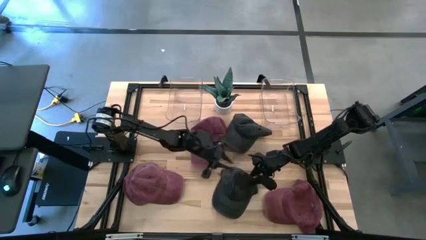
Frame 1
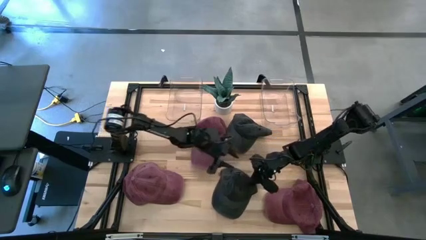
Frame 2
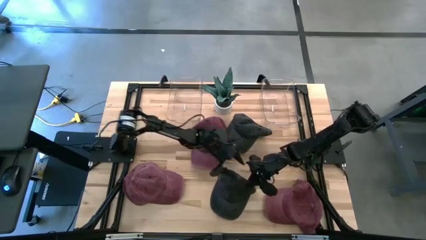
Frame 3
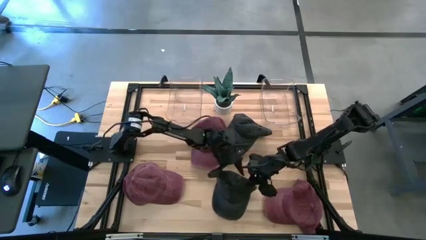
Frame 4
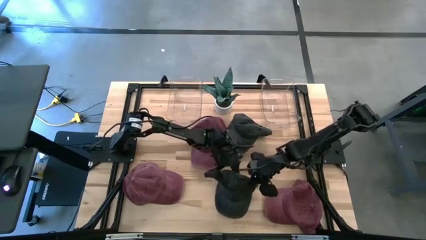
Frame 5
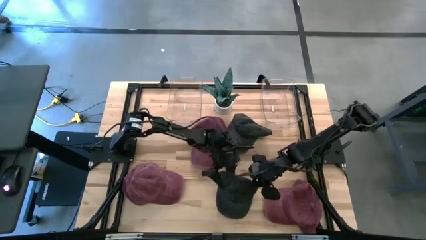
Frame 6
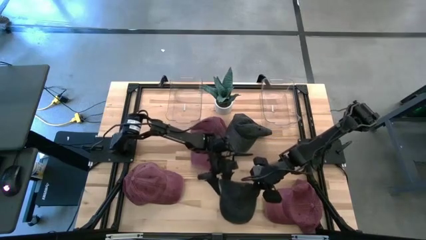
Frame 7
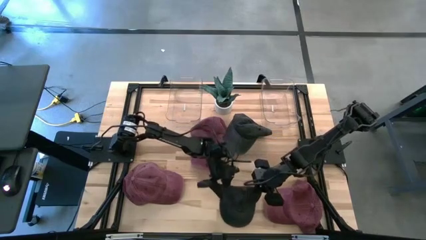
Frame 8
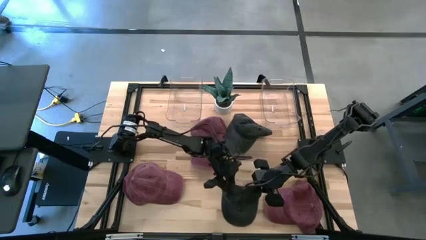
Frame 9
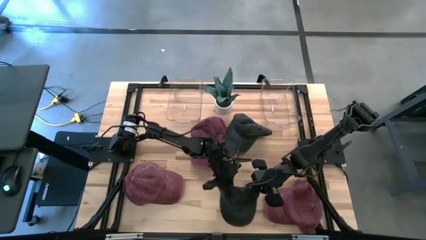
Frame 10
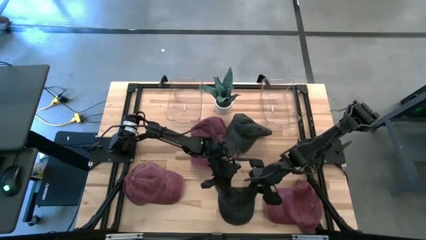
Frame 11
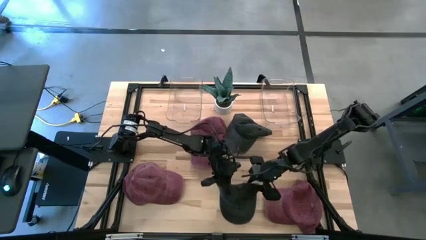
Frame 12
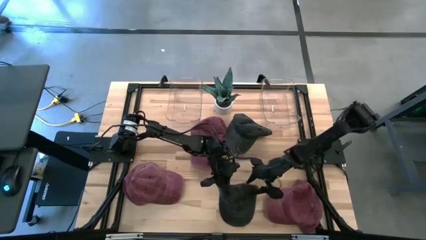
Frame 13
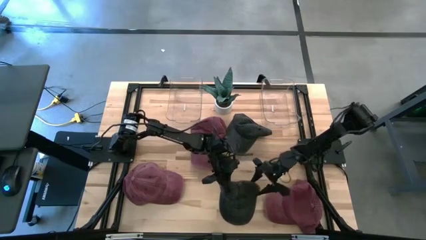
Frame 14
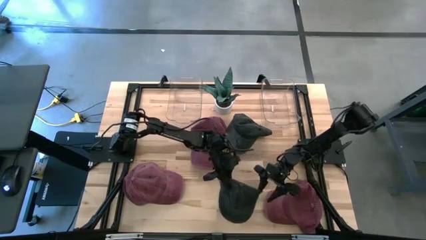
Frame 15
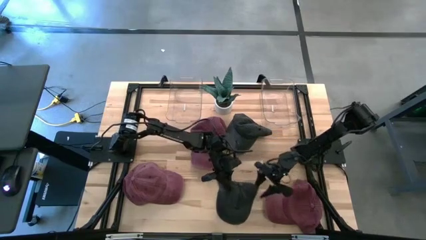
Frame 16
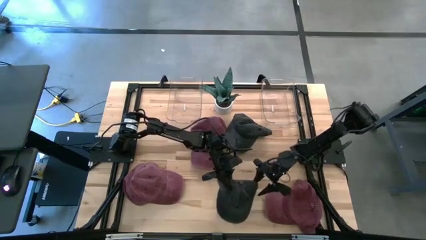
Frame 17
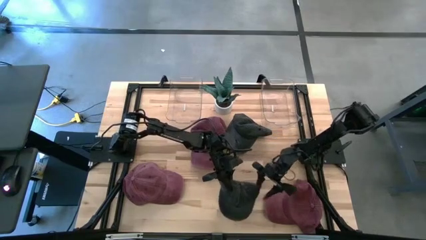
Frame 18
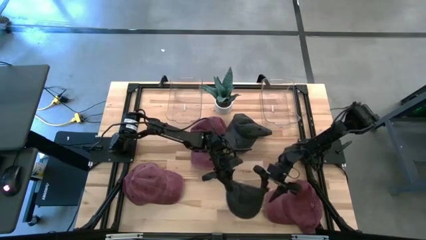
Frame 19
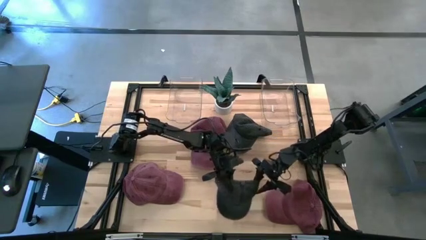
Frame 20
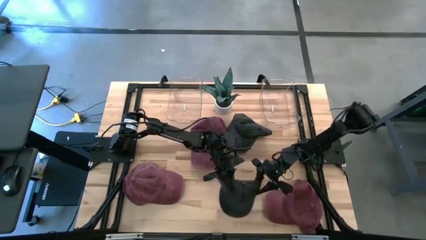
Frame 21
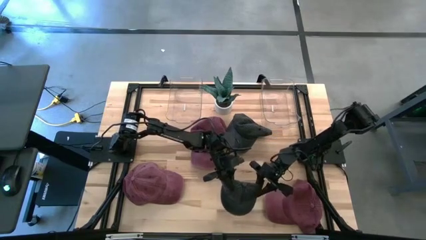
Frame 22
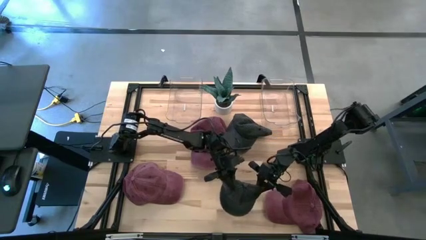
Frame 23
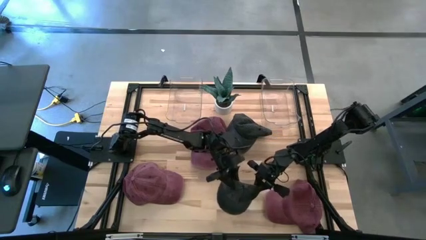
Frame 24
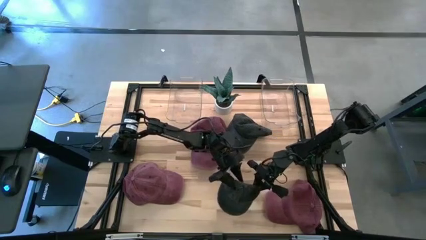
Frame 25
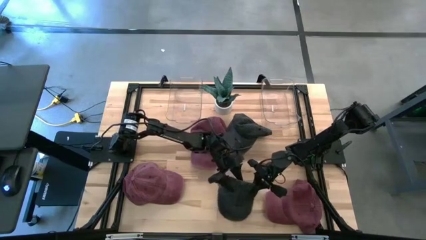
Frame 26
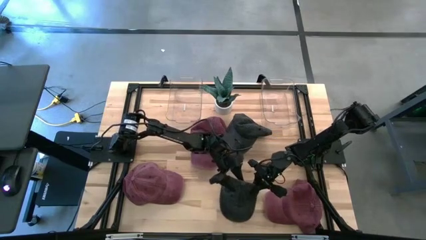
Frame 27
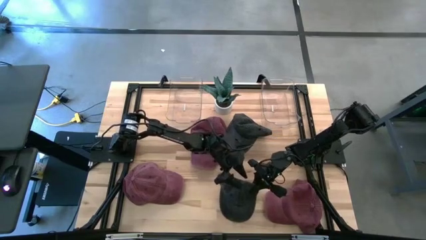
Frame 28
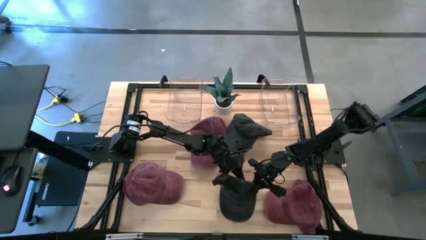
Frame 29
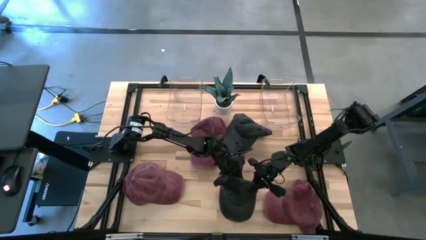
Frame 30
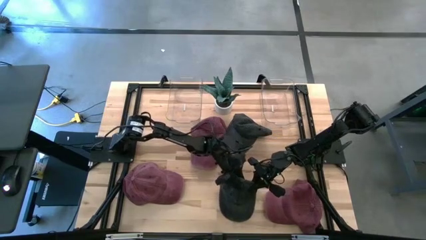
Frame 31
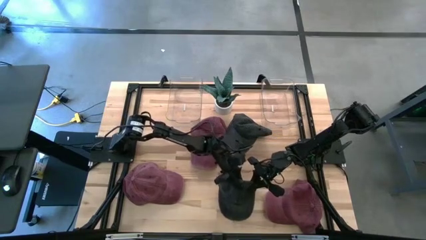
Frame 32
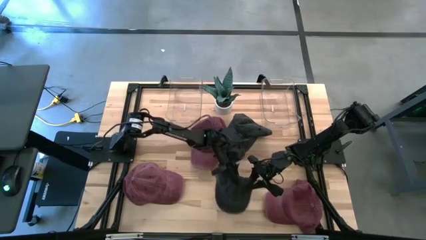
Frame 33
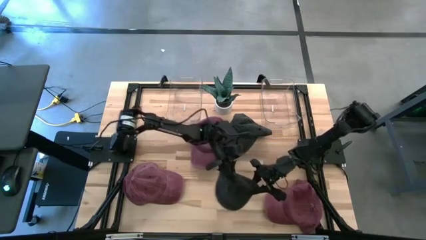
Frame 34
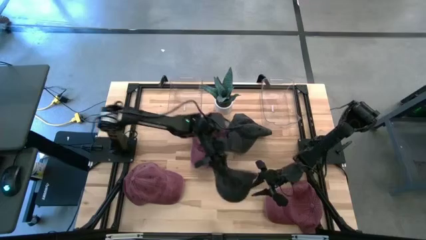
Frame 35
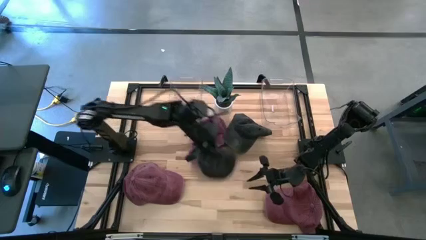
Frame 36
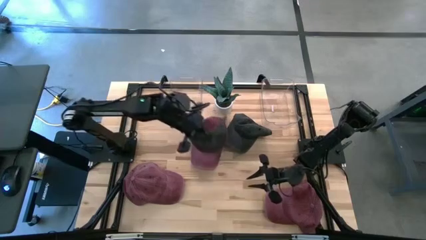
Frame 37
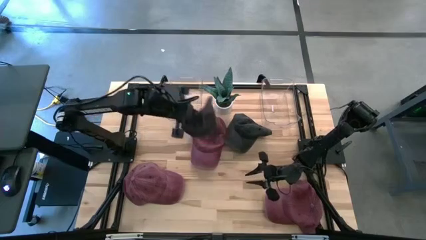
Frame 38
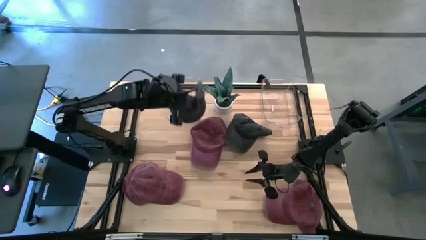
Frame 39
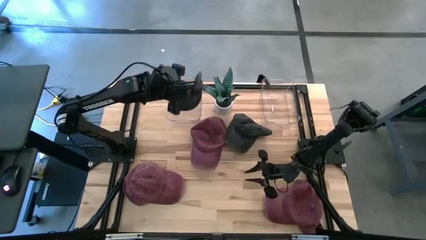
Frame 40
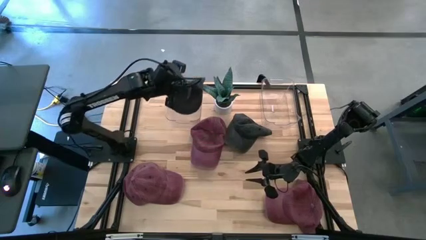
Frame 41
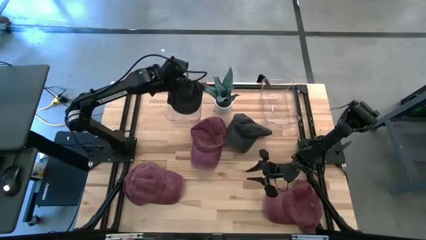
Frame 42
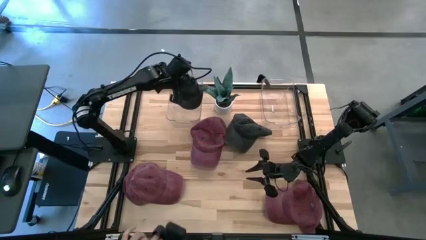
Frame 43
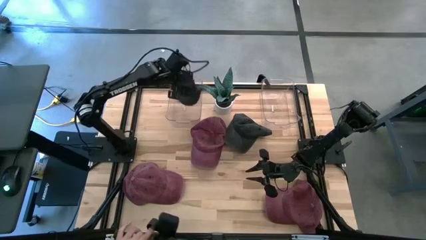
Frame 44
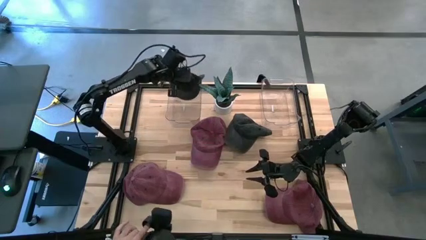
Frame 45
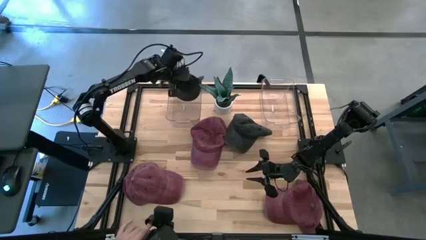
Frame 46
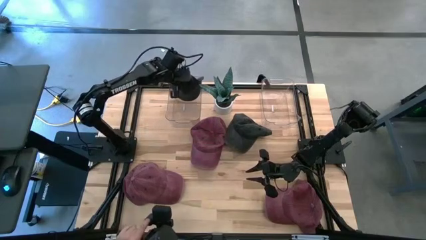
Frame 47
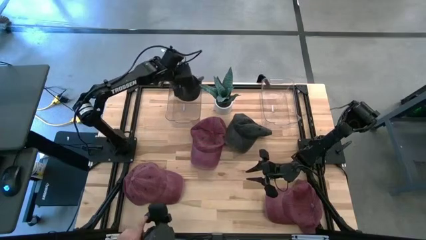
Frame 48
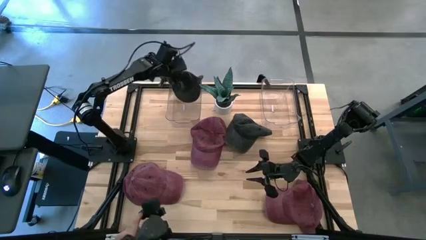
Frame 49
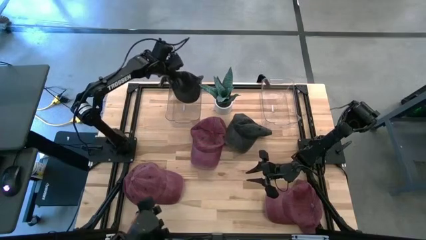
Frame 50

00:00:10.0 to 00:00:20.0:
Task: Pick & Place hat
Put the bottom black cap into the left transparent bin

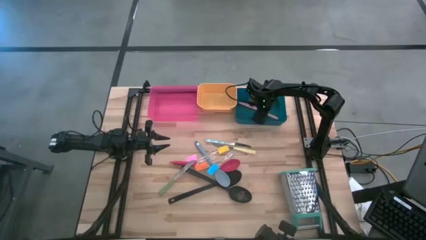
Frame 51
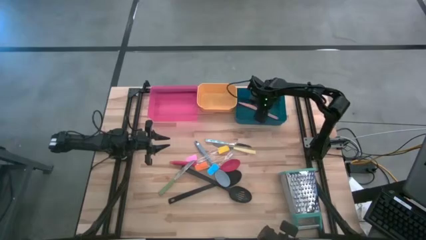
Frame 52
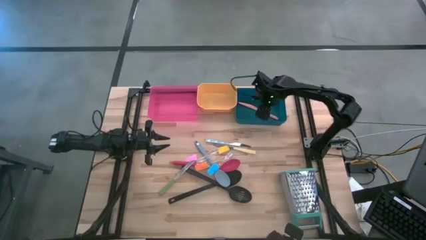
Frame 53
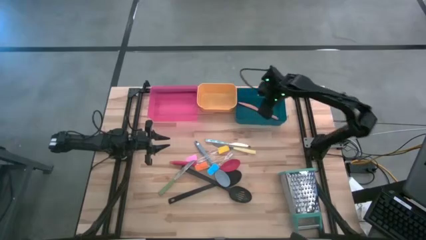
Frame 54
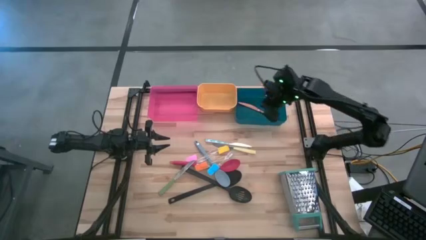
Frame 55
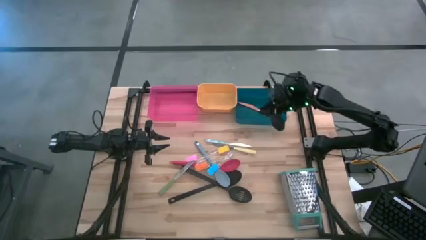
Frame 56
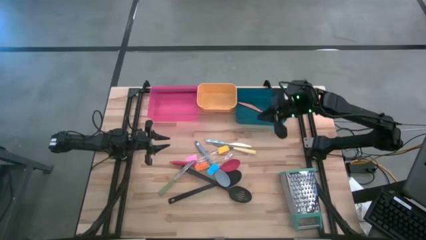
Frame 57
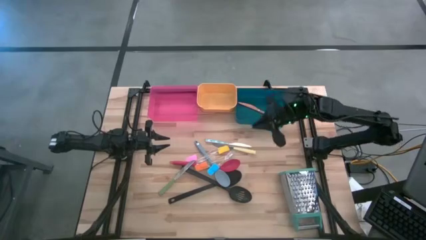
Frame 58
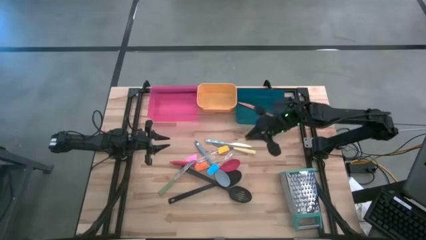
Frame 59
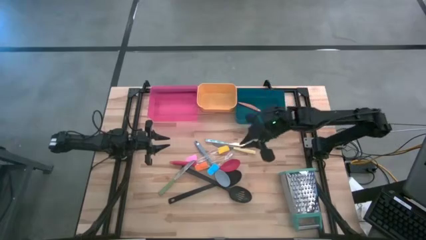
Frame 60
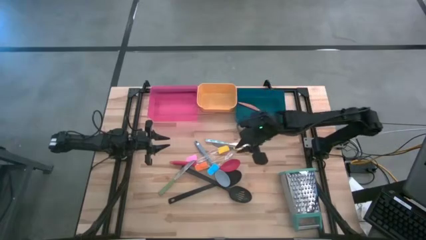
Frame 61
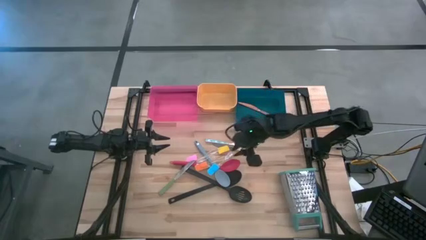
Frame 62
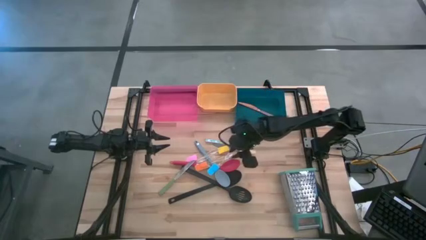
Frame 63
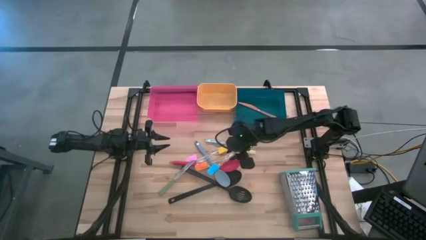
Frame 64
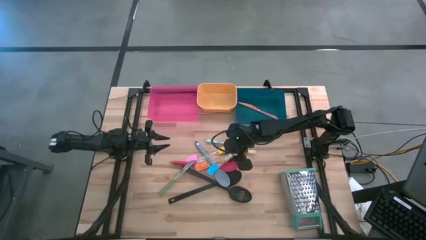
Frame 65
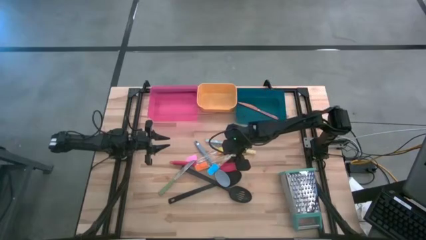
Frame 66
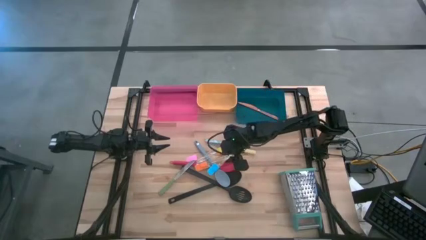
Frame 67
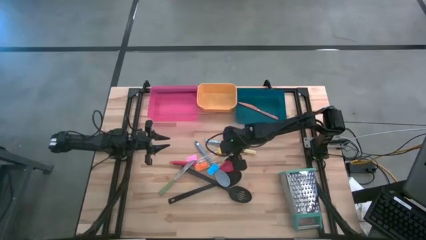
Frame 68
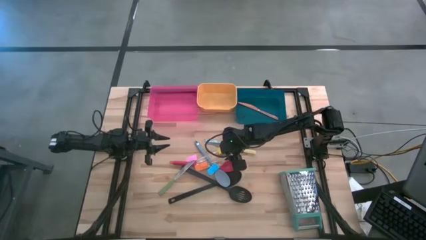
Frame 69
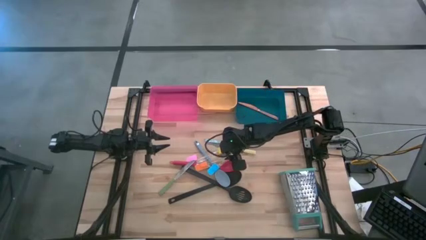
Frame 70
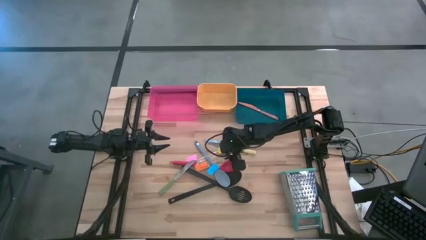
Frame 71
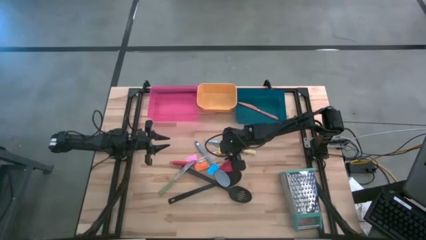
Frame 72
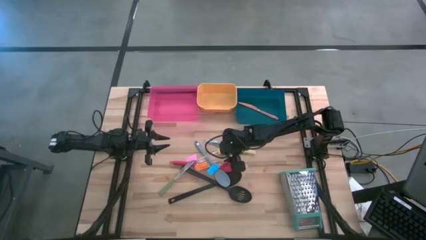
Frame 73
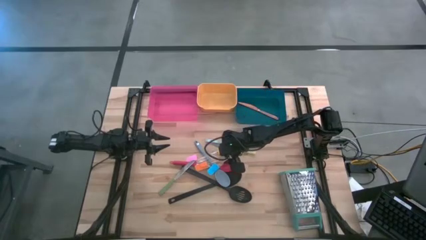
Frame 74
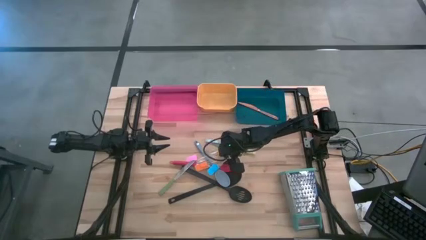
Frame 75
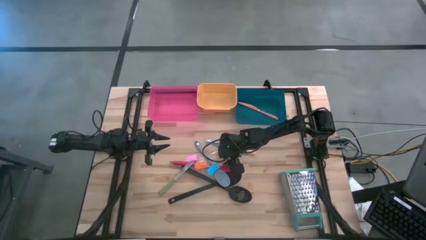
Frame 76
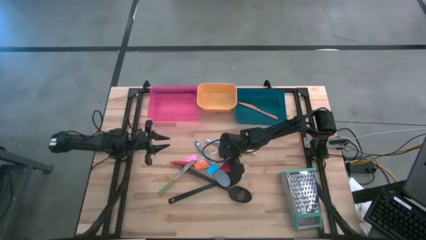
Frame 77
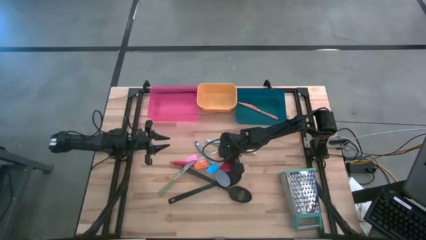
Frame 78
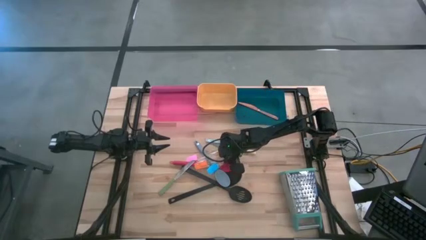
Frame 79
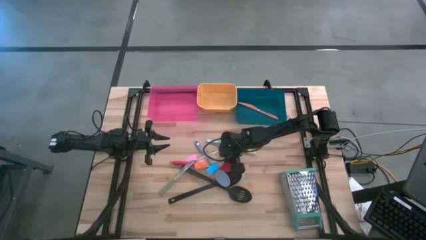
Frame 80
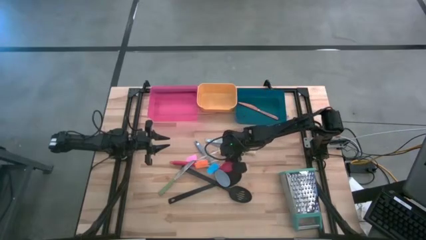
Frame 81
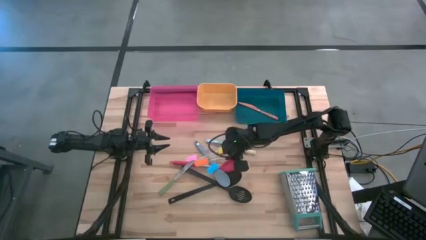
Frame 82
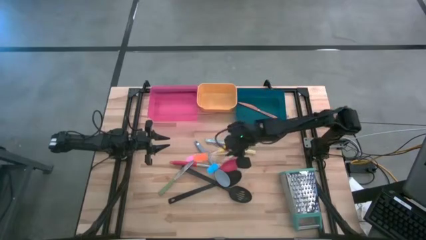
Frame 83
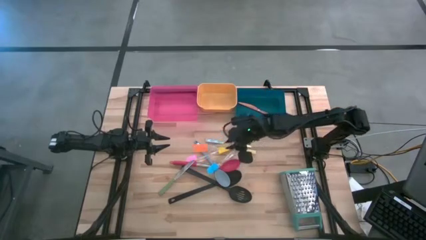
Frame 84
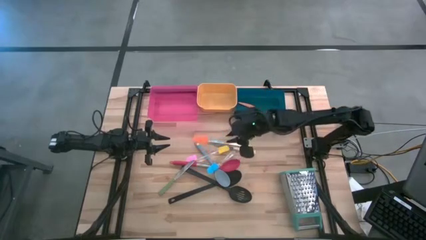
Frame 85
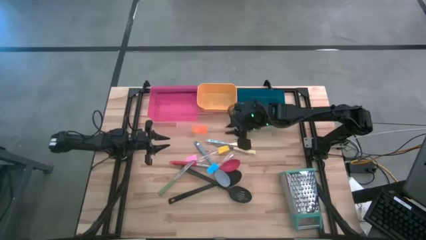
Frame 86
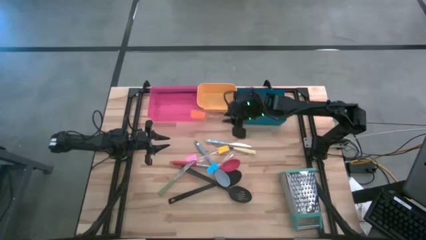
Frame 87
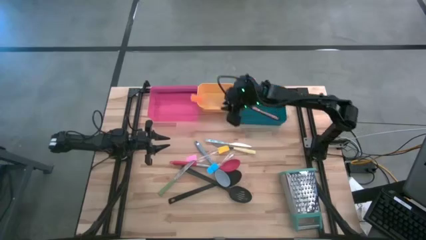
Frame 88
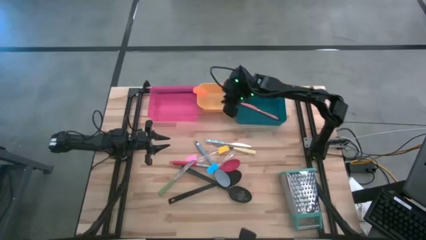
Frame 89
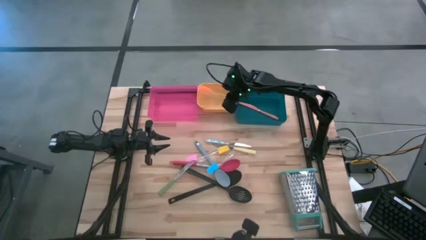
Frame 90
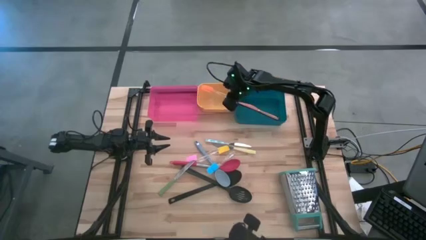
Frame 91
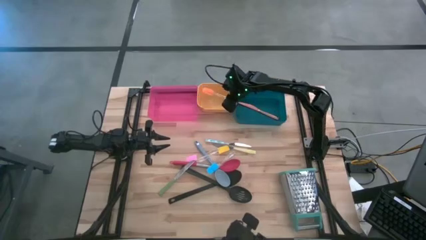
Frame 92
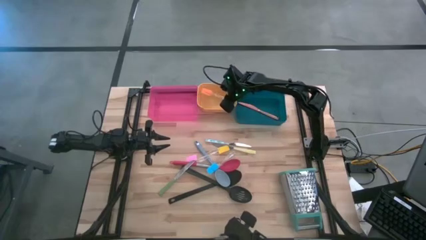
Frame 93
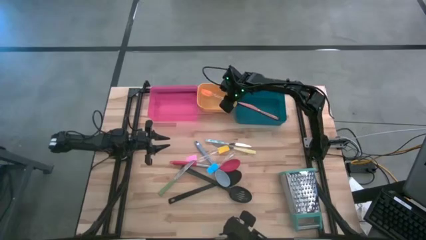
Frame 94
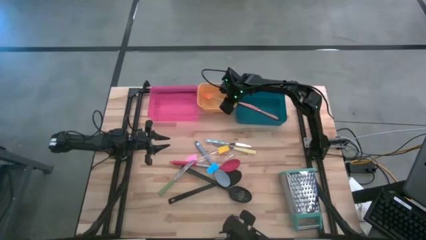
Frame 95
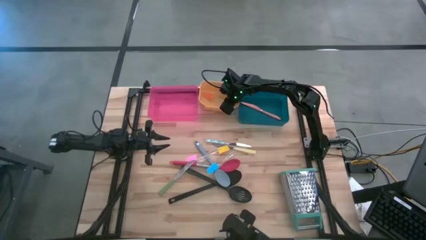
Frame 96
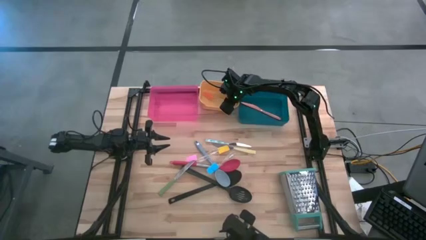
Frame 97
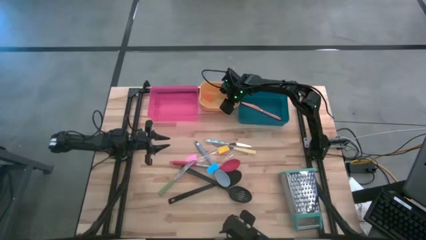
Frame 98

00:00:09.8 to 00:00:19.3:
Task: Pick & Place Kitchen Items
Put the orange spatula into the yellow bin
